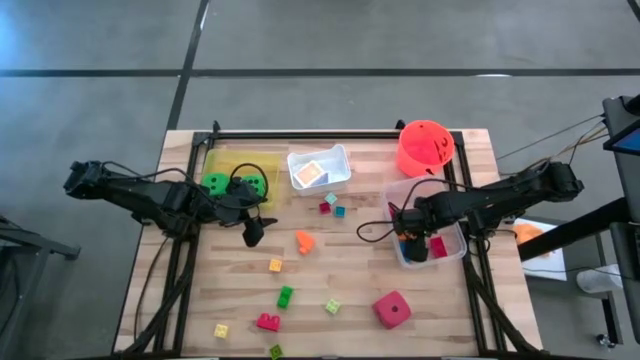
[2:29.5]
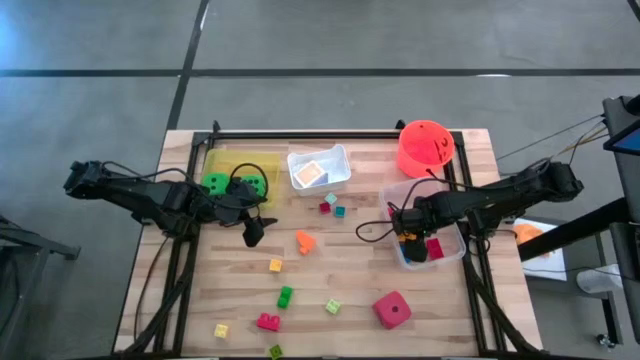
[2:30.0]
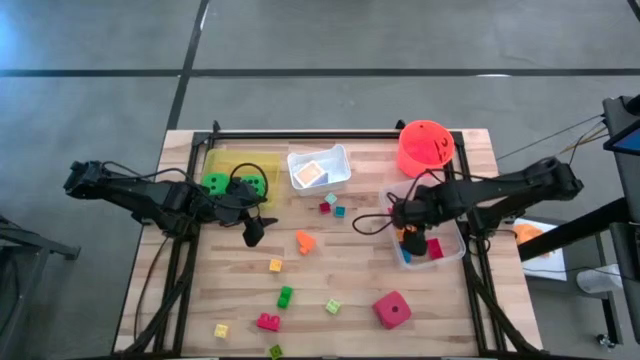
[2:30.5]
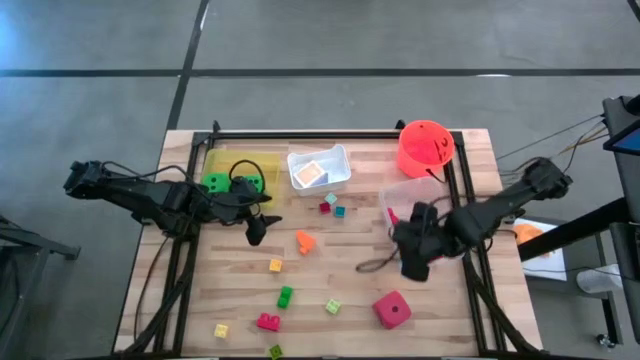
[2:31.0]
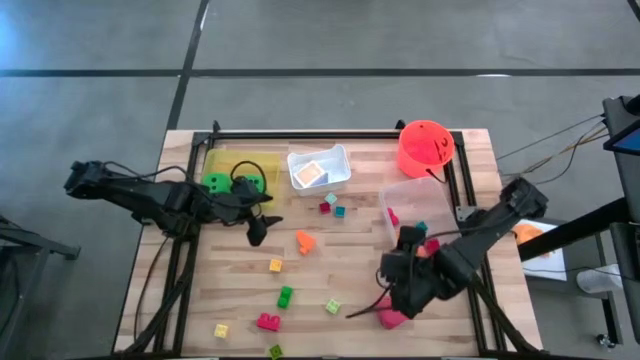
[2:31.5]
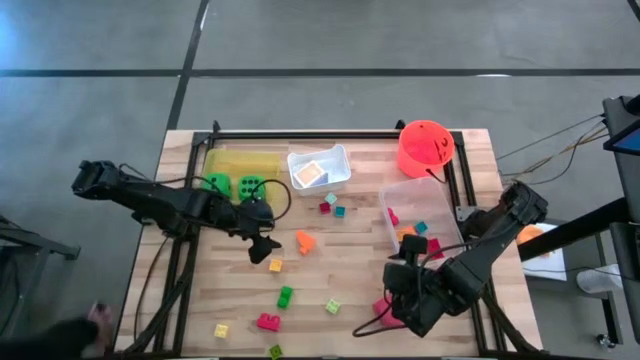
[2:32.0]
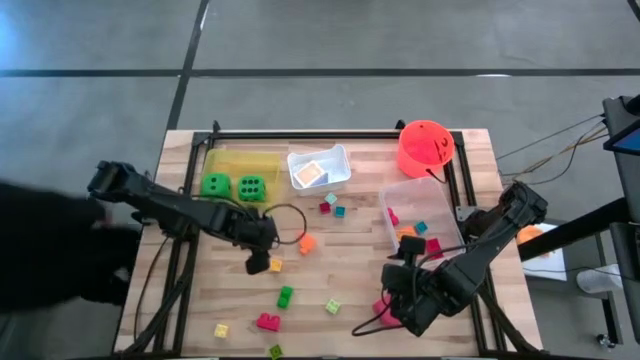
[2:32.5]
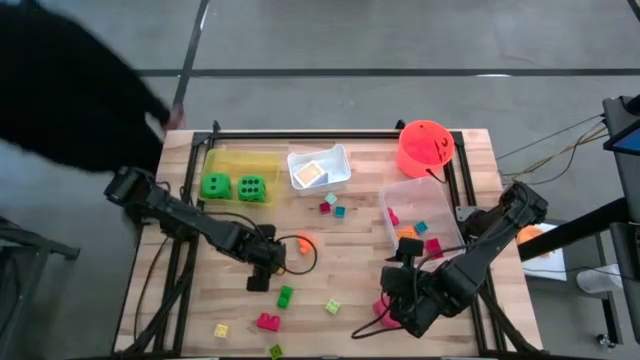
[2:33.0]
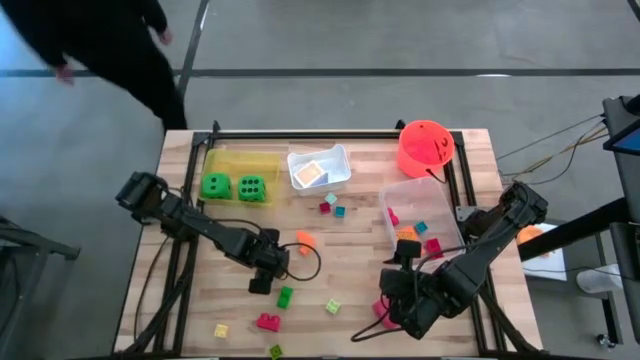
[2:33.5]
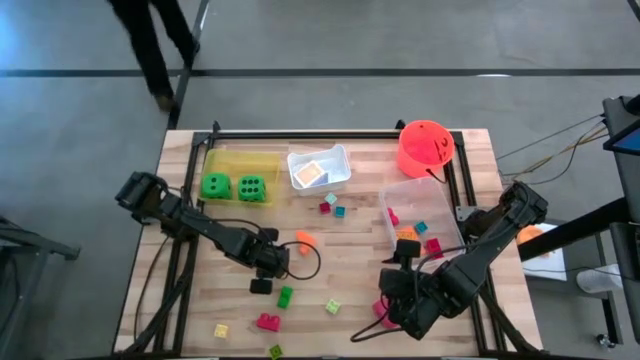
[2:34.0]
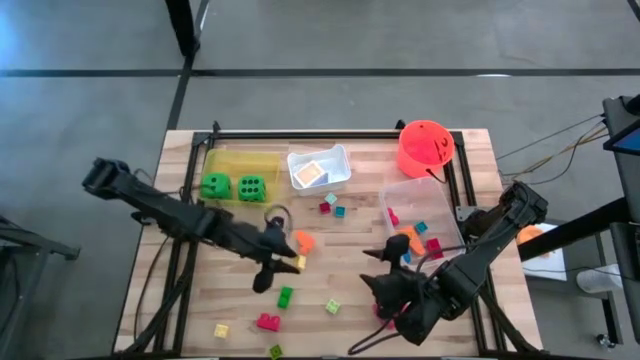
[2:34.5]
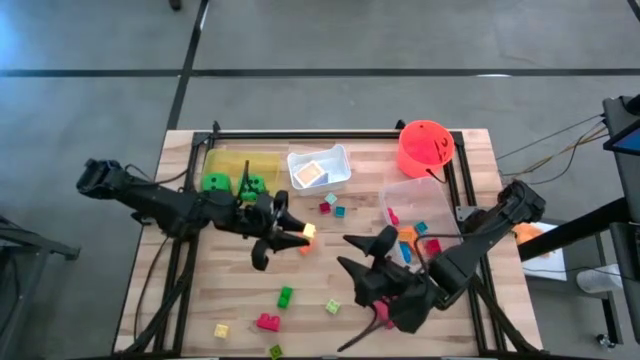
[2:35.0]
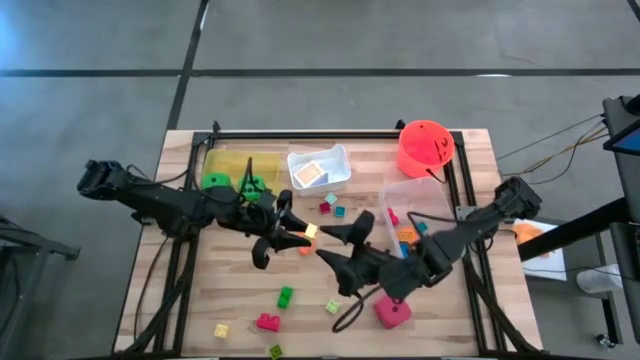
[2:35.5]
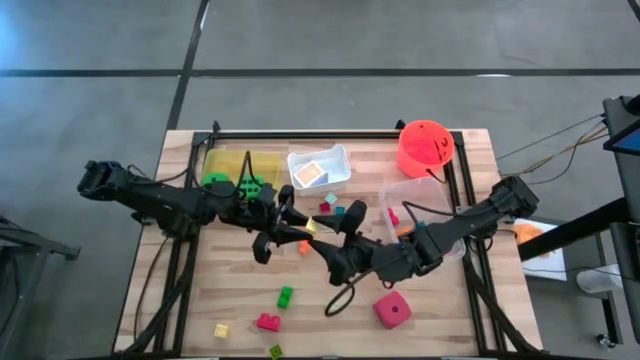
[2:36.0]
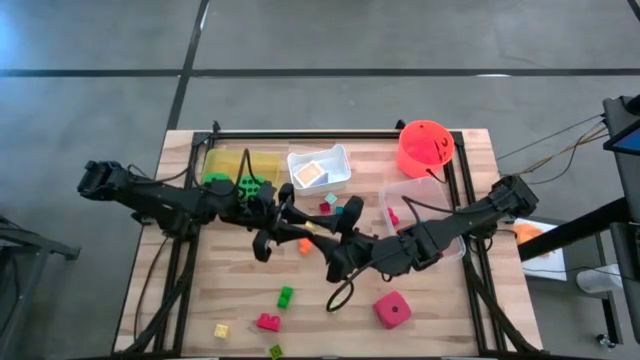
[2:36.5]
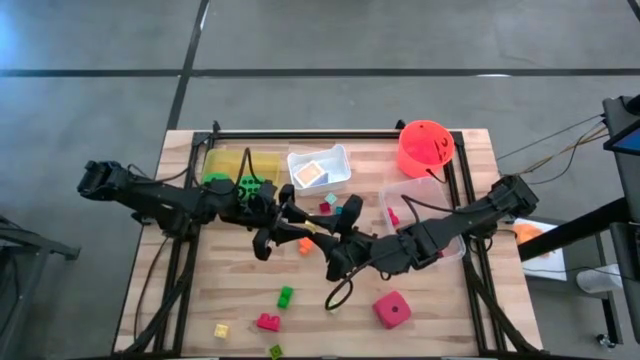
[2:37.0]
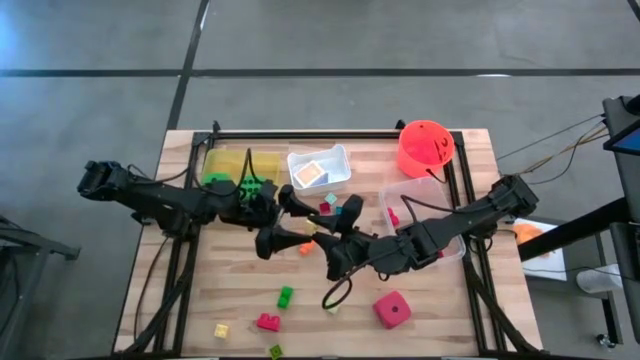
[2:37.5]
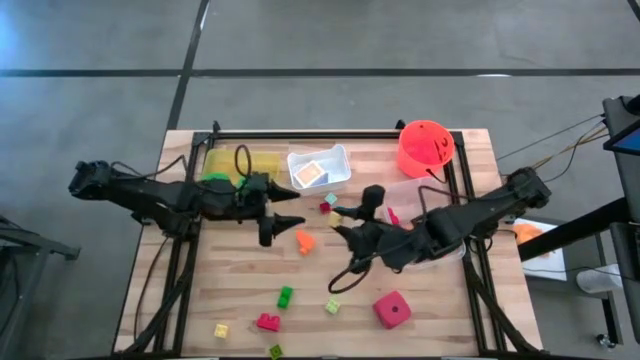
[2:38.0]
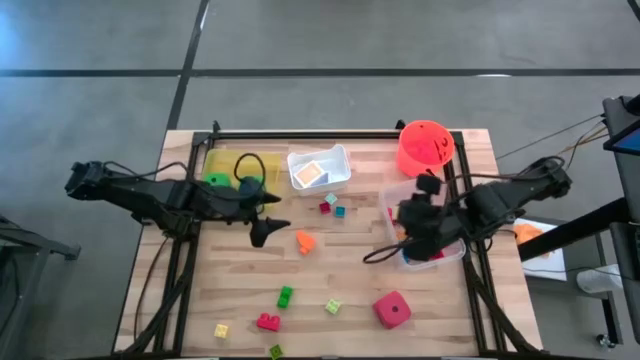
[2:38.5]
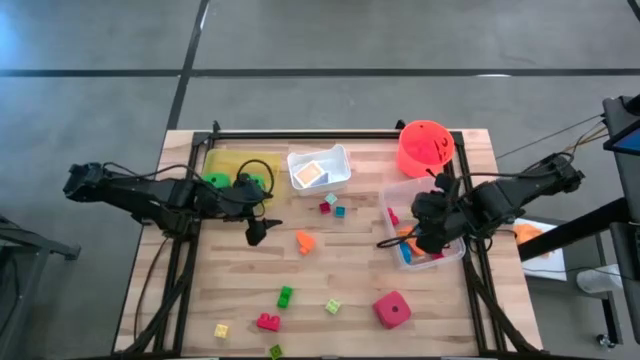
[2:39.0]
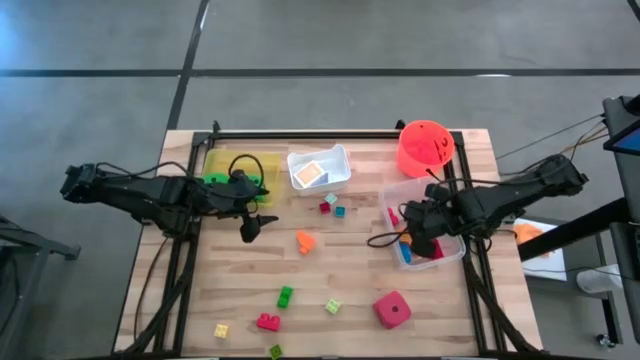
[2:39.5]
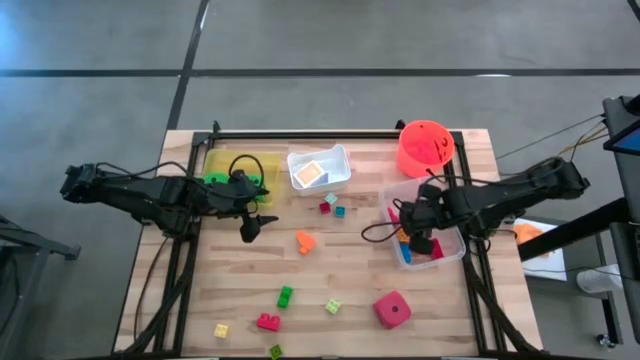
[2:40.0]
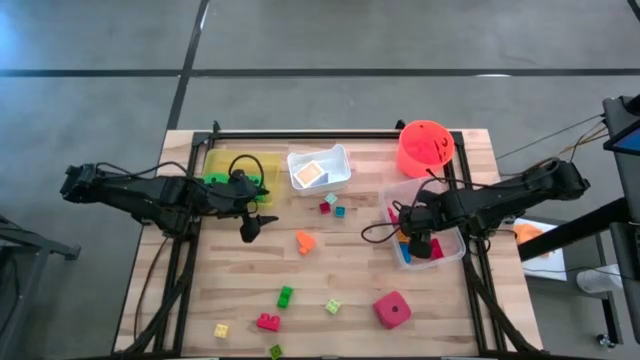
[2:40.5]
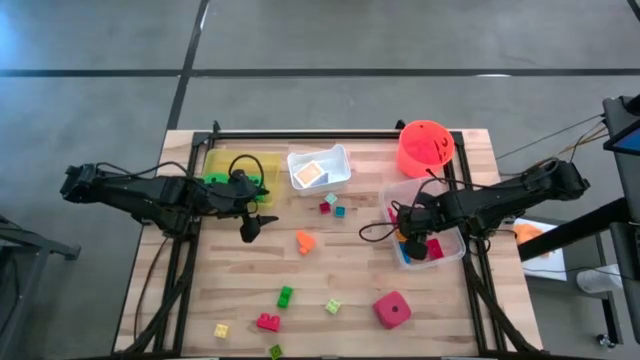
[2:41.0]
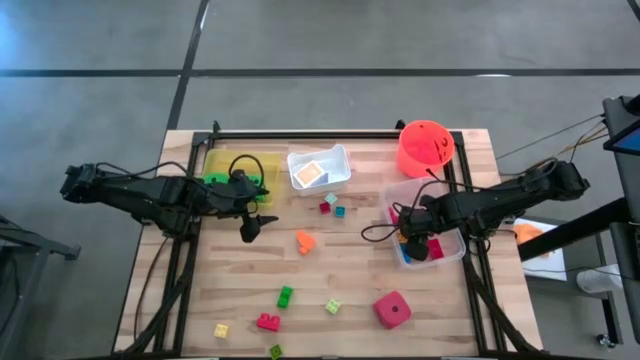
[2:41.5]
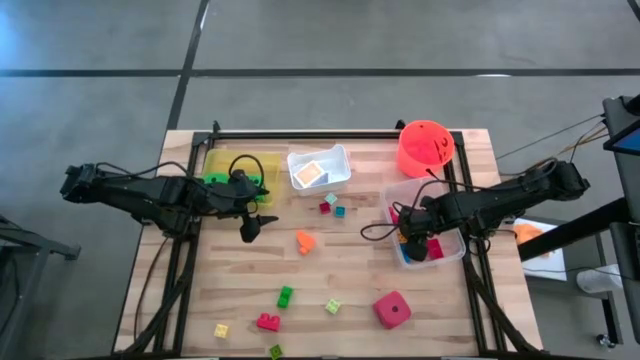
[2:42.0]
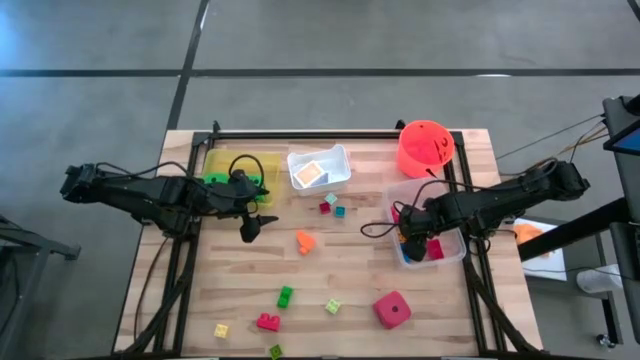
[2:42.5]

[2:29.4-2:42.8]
Task: Pick & Place Toys
Put the yellow game piece into the transparent bin

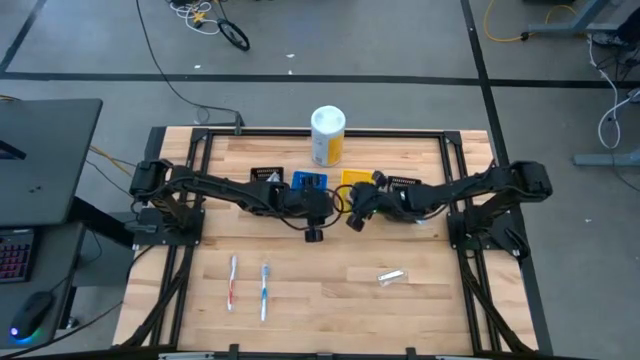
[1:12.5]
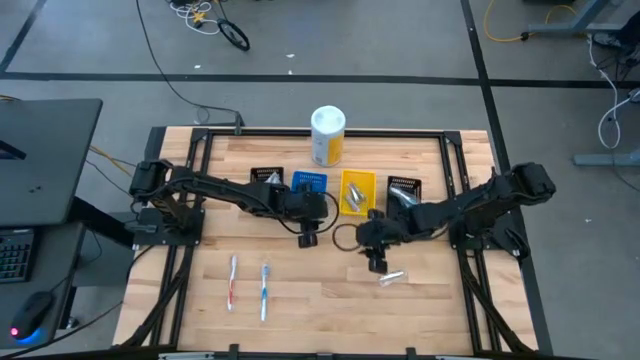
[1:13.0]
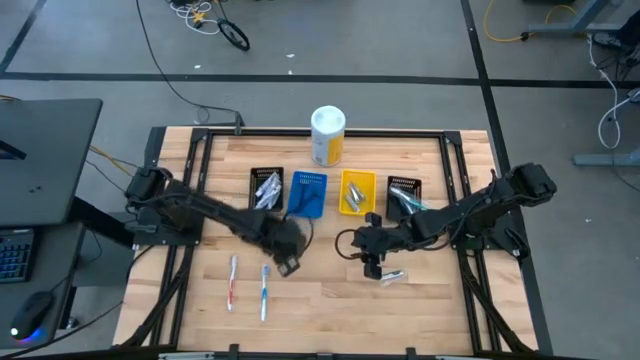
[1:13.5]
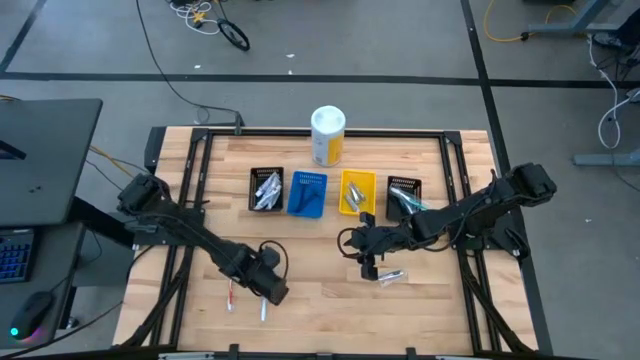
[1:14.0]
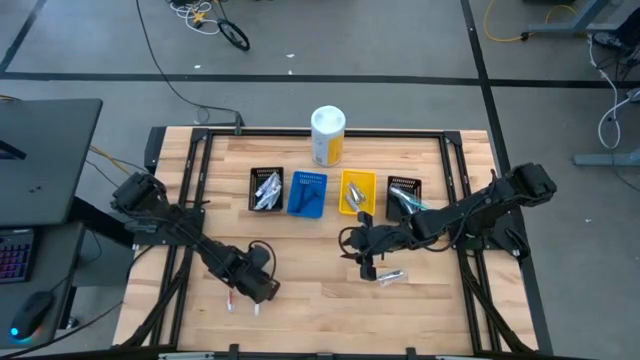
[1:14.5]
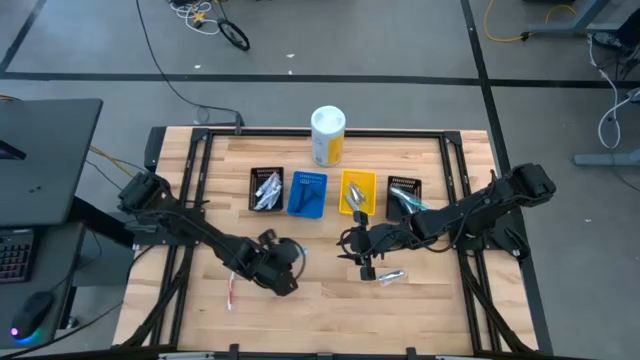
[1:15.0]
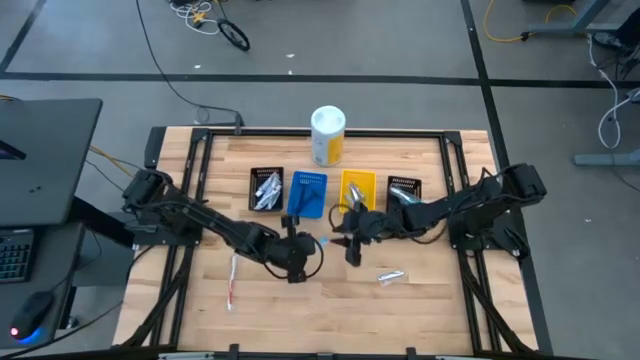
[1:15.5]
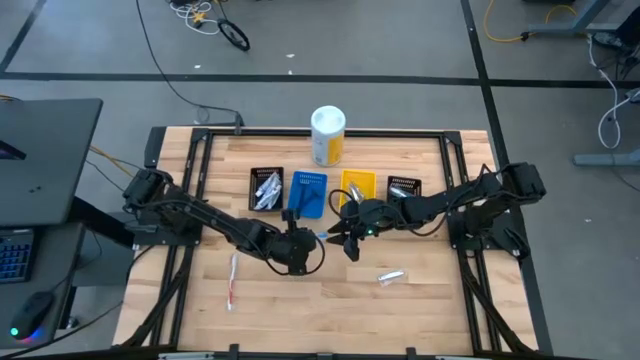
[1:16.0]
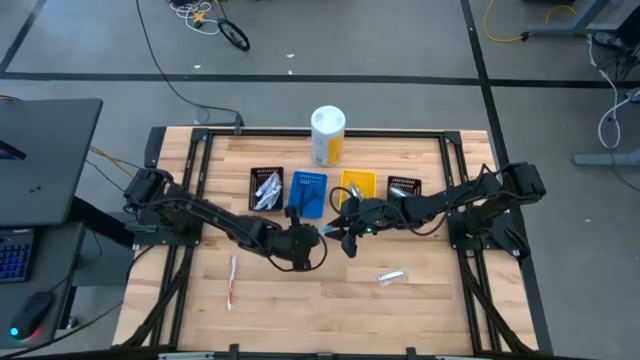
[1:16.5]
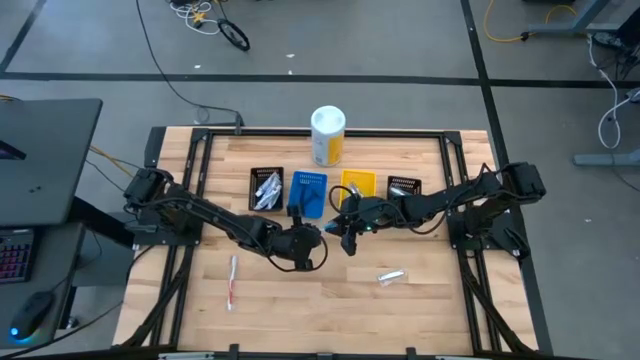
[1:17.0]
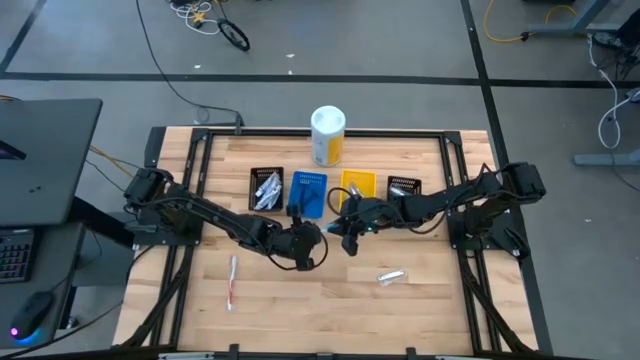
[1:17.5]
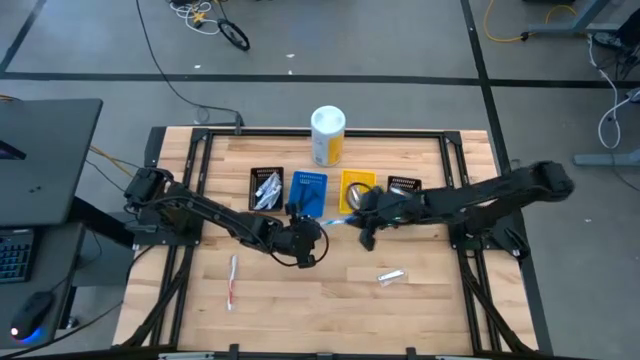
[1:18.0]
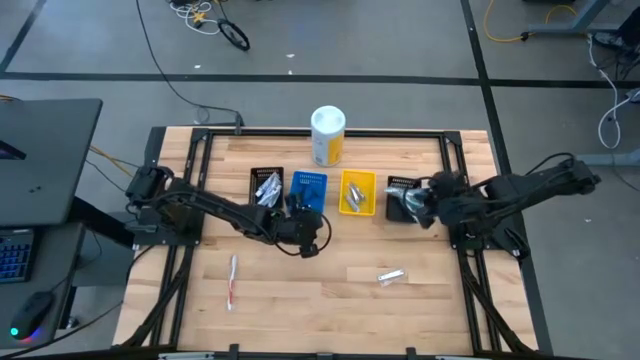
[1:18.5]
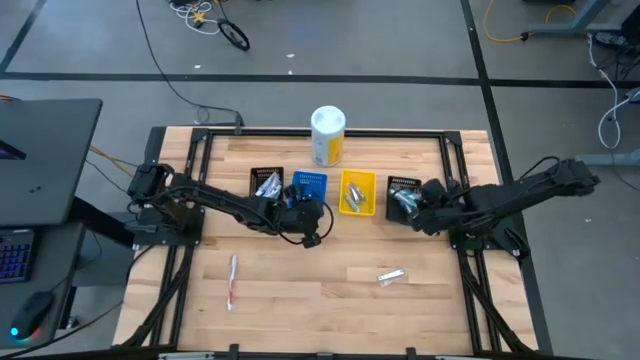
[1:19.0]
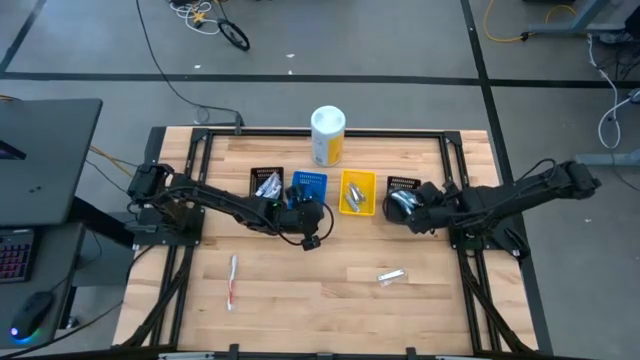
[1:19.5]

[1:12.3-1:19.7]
Task: Pick & Place Travel size toiletries
Put the blue toothbrush into the right black bin
